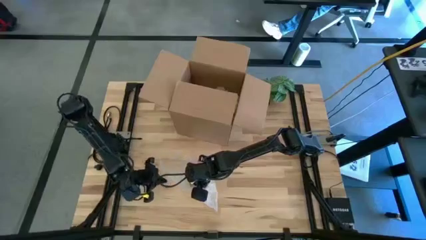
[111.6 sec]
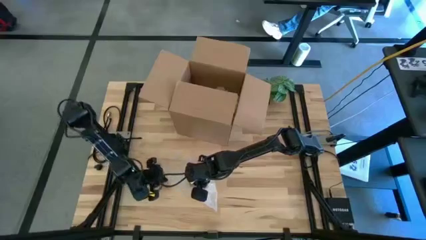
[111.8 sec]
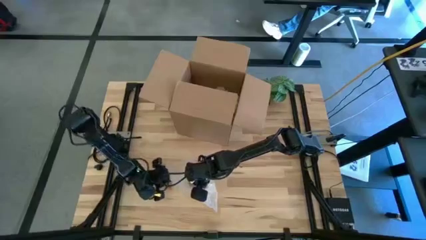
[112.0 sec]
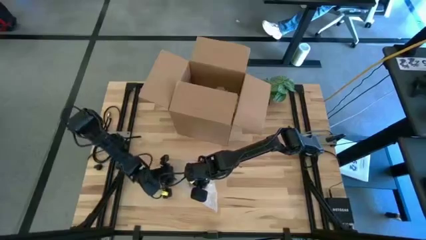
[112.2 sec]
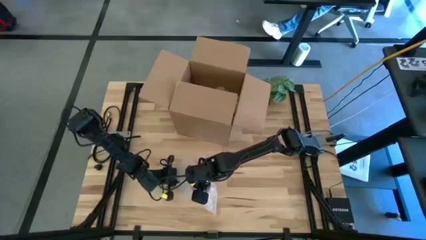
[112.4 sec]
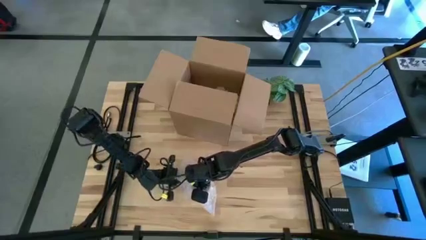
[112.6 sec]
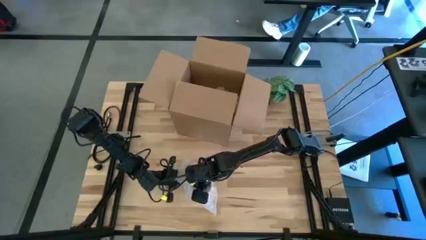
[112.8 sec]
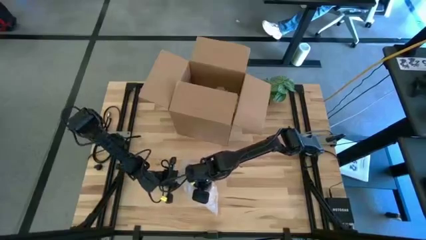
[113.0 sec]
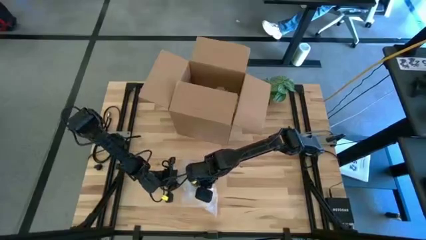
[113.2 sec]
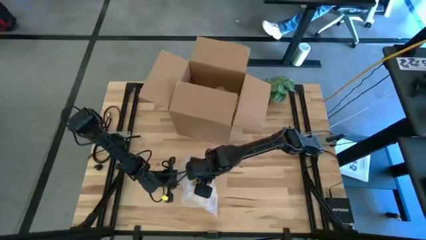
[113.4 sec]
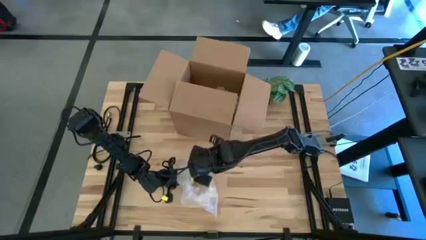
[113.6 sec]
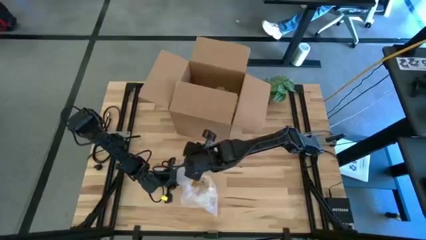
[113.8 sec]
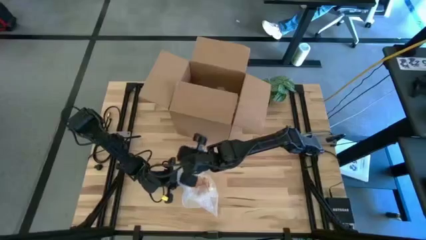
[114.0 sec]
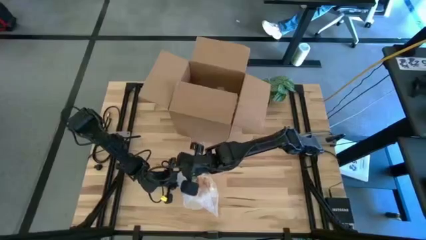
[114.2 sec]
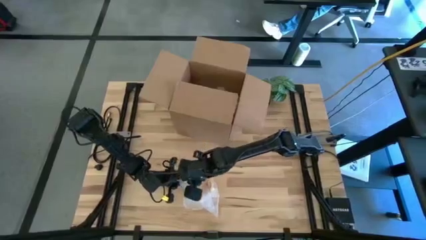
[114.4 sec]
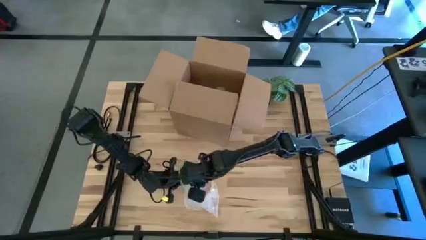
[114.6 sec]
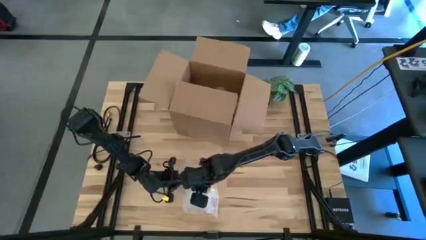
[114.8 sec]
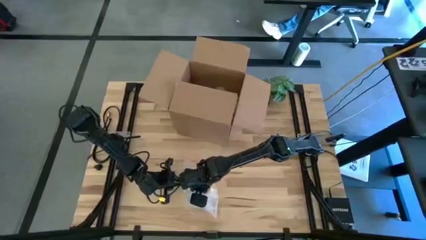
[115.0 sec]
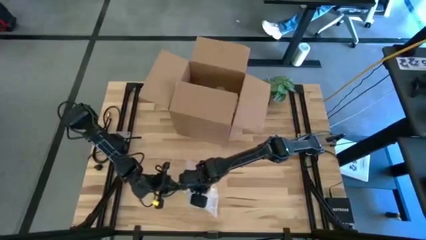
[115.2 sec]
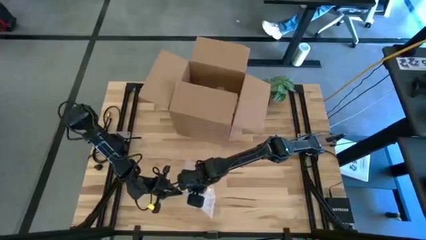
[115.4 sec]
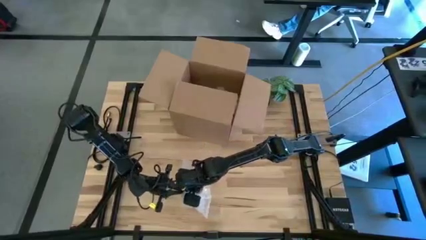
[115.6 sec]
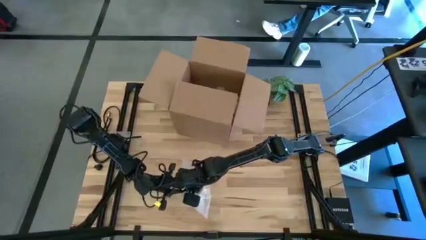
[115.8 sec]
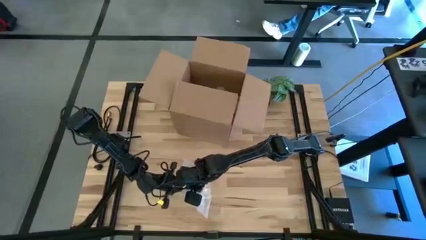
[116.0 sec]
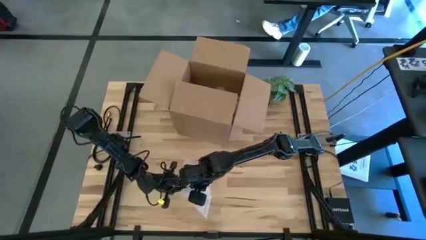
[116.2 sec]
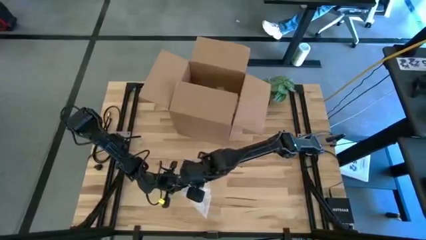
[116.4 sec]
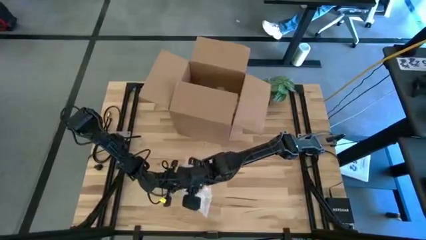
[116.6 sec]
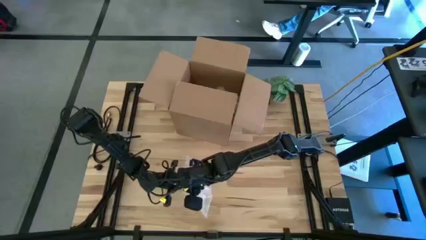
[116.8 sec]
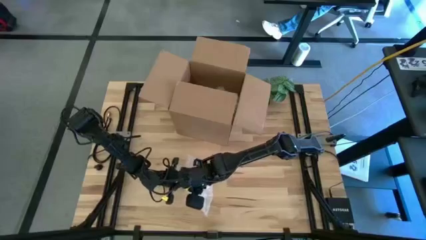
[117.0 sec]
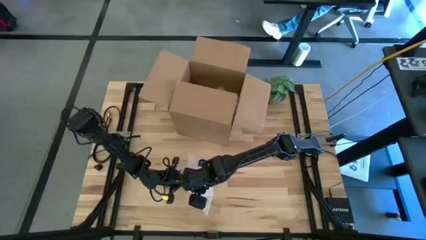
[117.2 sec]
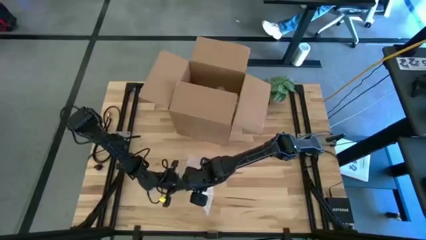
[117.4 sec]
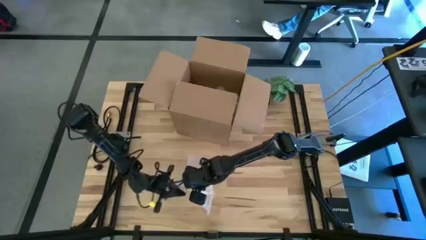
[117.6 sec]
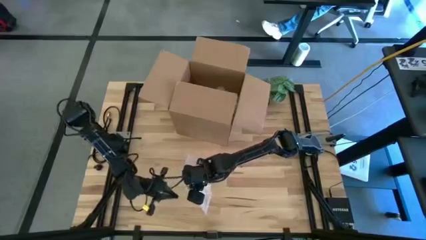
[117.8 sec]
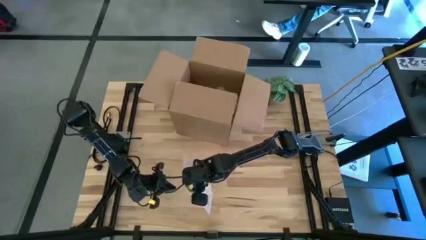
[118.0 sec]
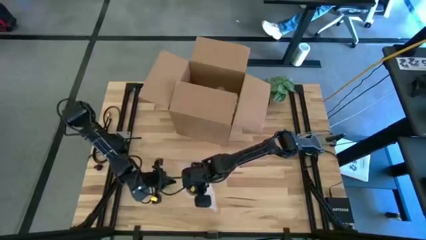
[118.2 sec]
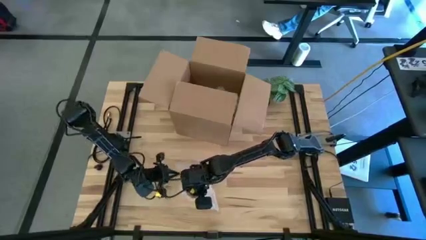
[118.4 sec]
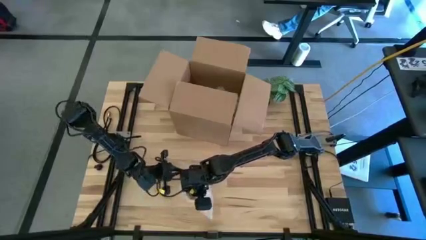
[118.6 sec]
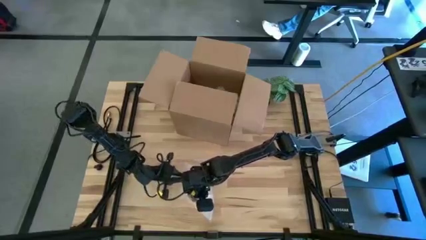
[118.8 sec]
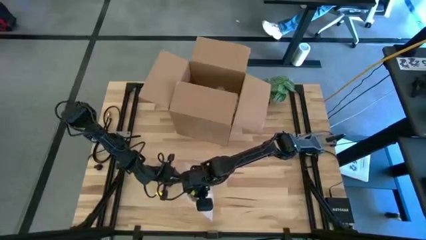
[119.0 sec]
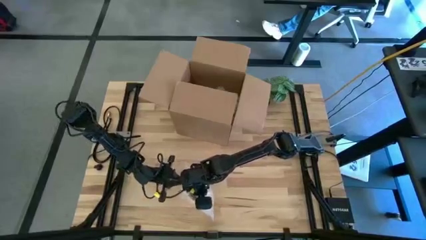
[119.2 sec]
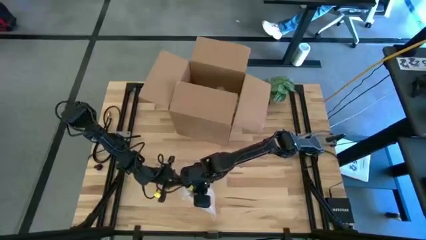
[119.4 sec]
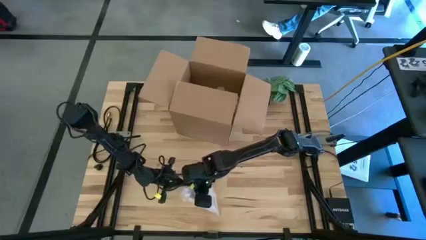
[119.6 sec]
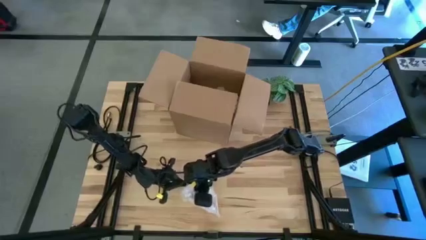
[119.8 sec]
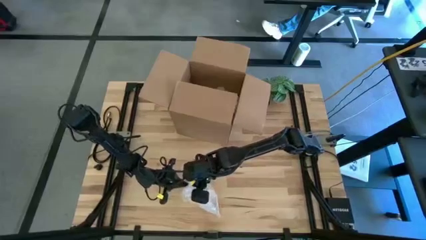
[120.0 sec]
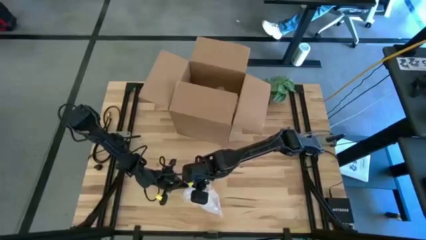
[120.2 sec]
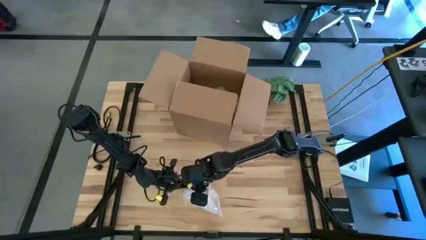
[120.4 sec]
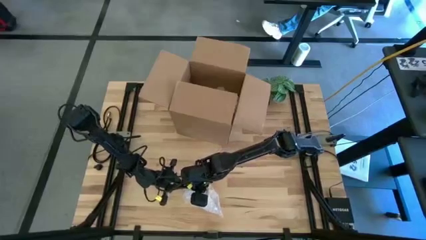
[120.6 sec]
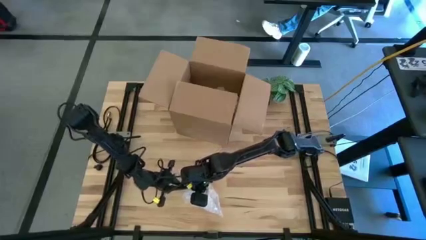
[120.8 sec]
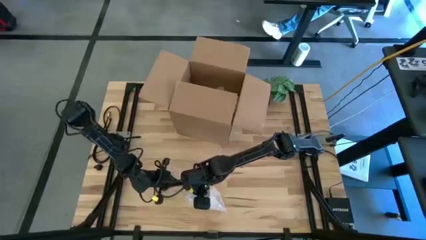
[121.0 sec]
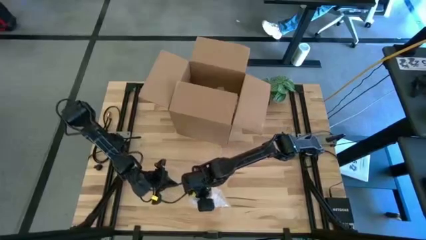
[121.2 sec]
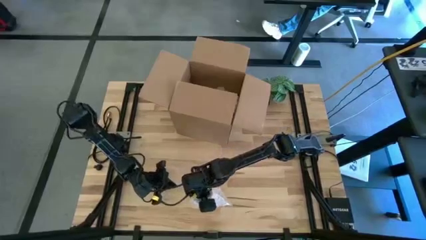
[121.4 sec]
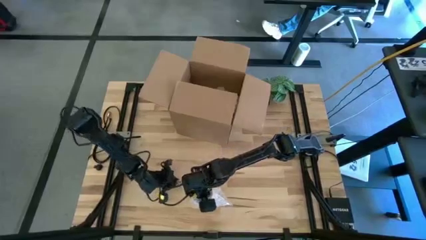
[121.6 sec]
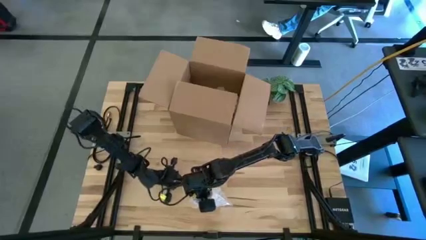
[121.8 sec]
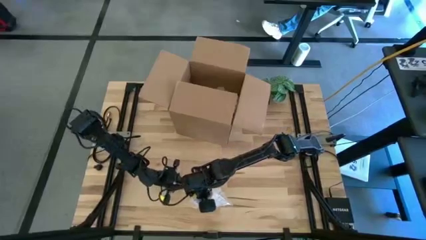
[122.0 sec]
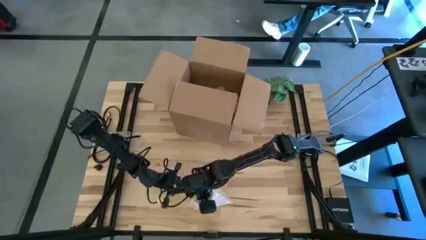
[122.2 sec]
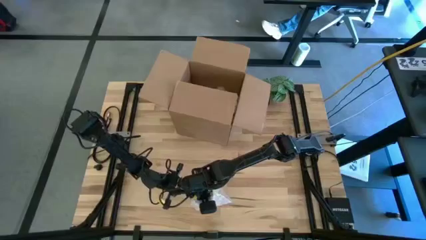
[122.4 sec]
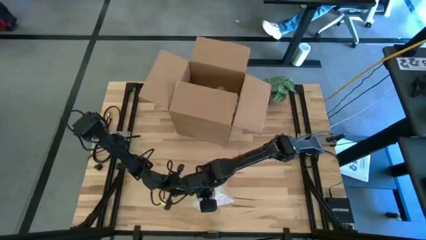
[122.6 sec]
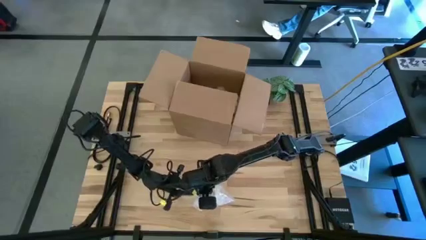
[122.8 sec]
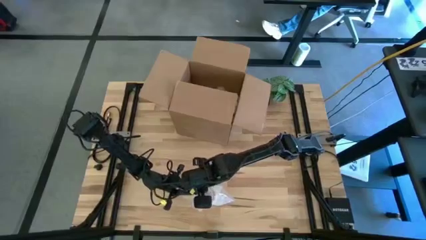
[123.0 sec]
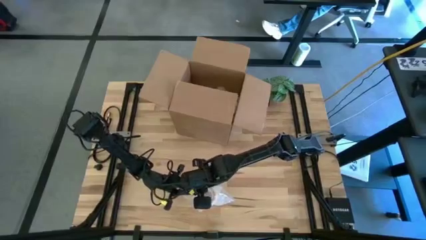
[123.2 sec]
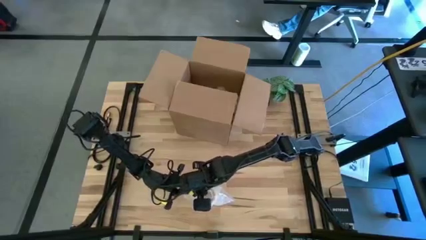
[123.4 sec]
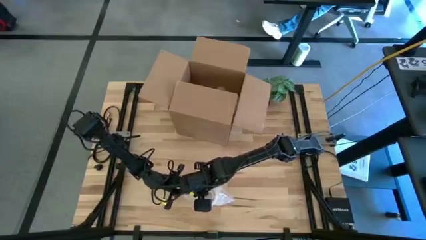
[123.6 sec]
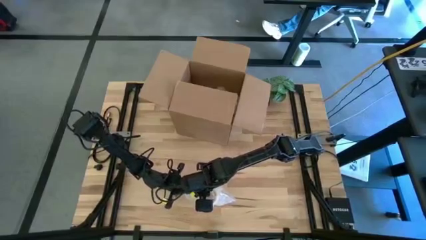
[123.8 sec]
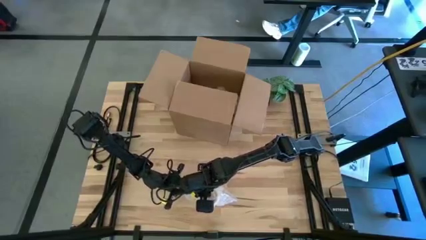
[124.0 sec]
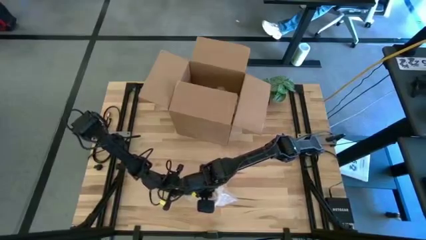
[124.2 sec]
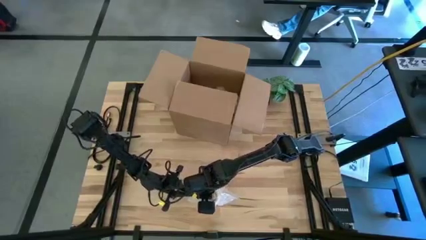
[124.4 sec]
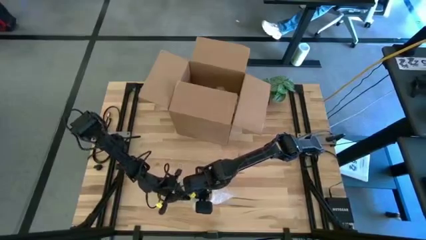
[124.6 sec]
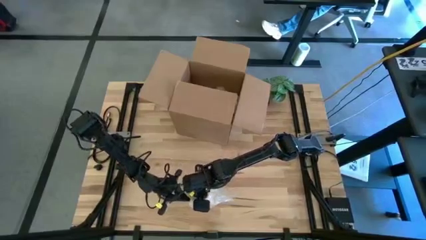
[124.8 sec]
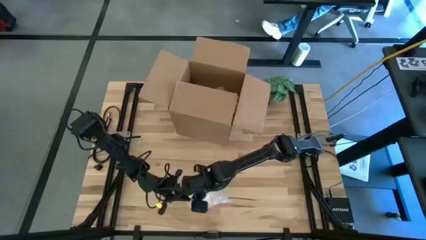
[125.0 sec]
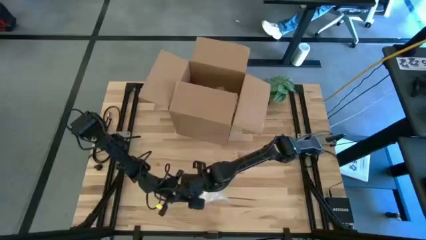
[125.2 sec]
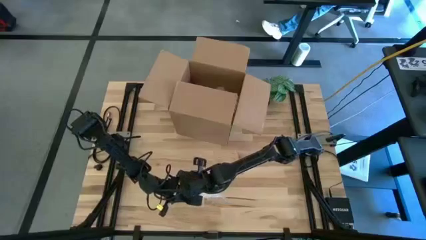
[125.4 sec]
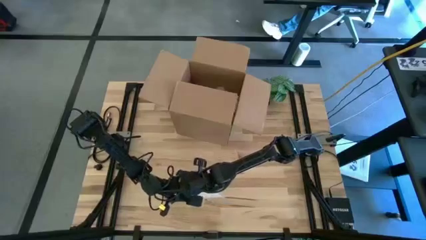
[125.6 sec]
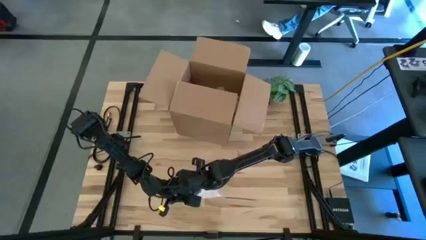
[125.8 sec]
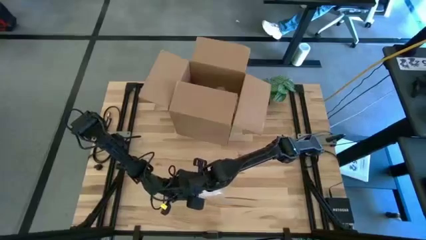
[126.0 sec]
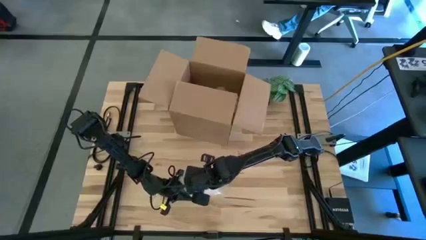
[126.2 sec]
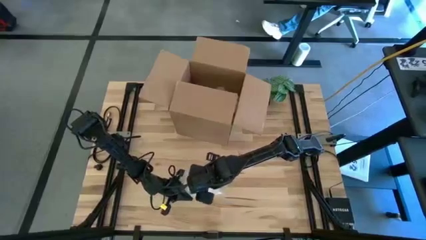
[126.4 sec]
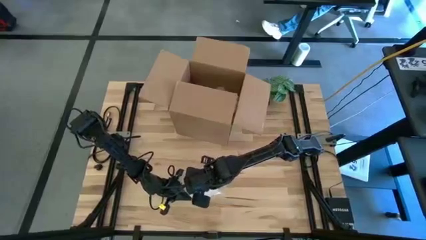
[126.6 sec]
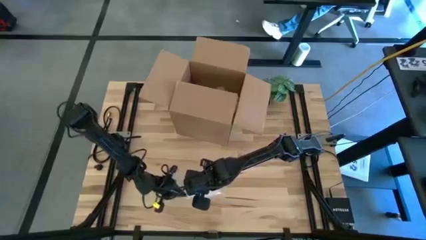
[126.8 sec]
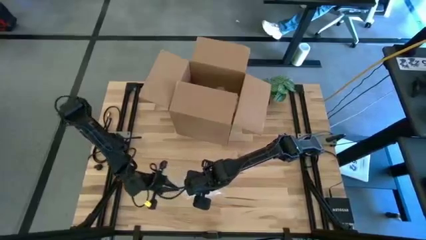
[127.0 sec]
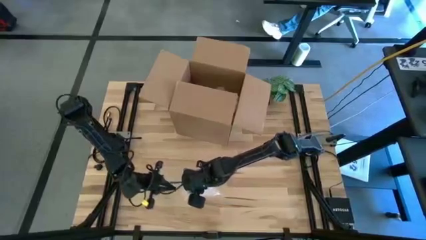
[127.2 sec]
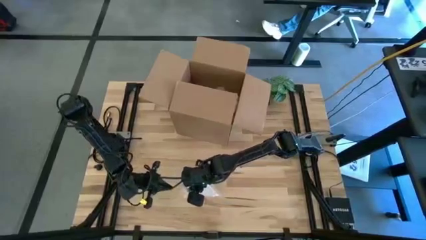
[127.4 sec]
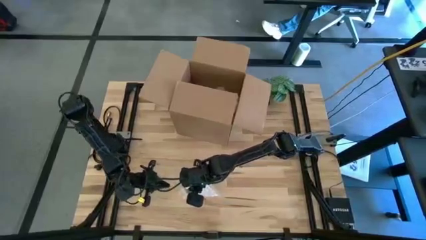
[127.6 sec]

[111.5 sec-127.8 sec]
Task: wrap mug
Wrap the yellow mug with the bubble wrap
